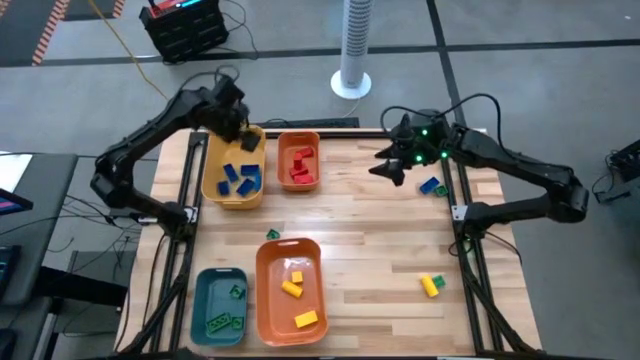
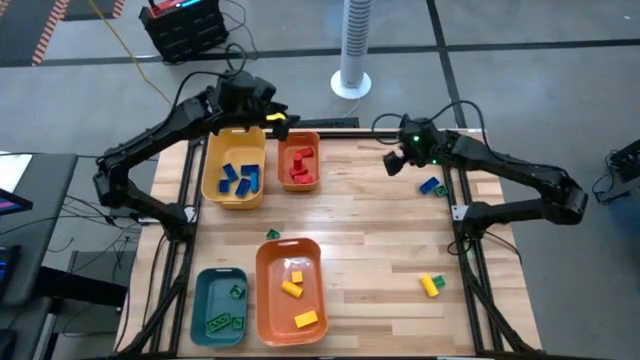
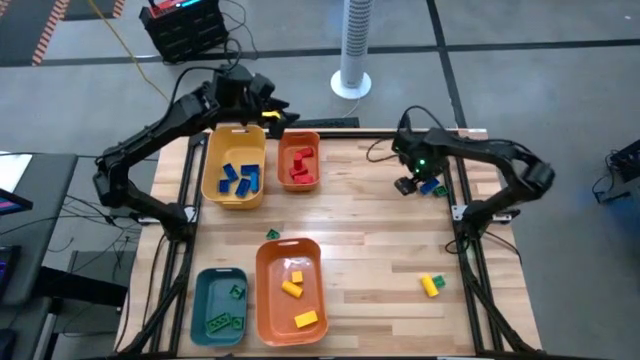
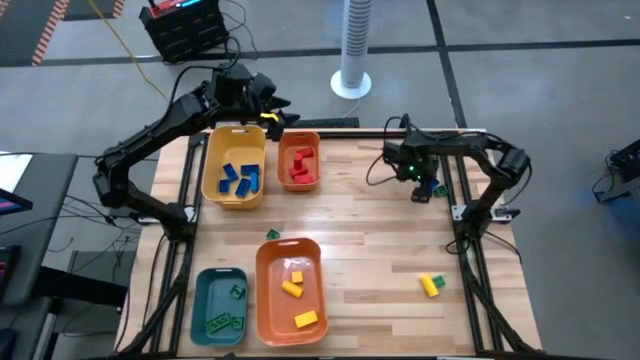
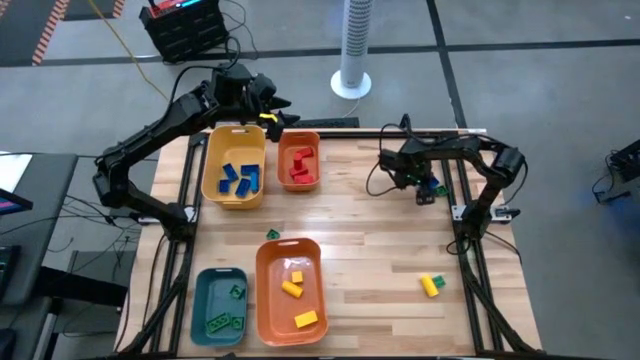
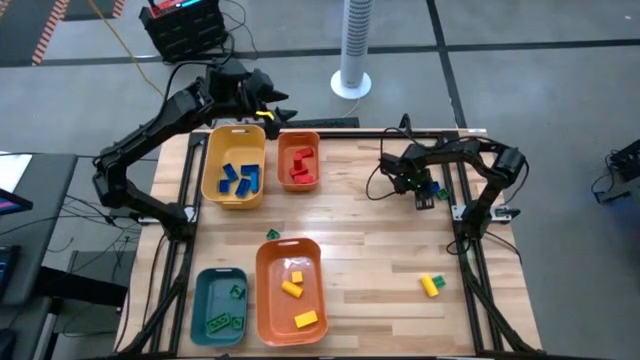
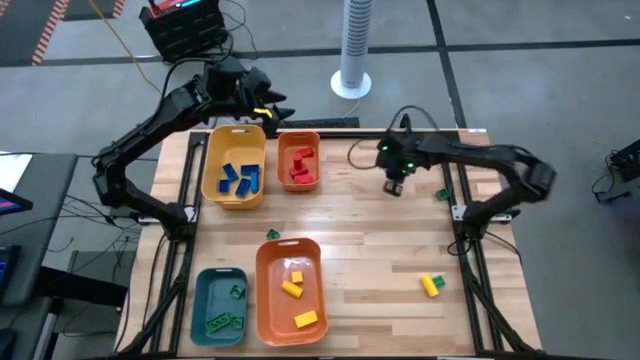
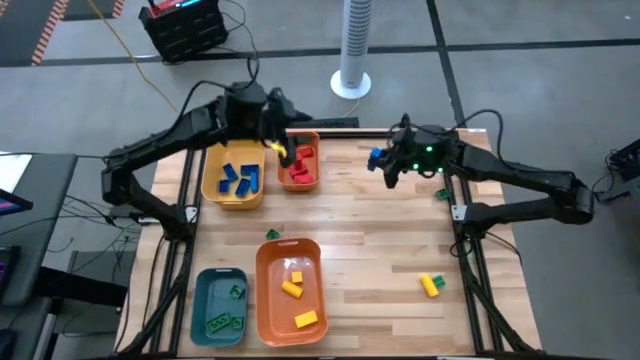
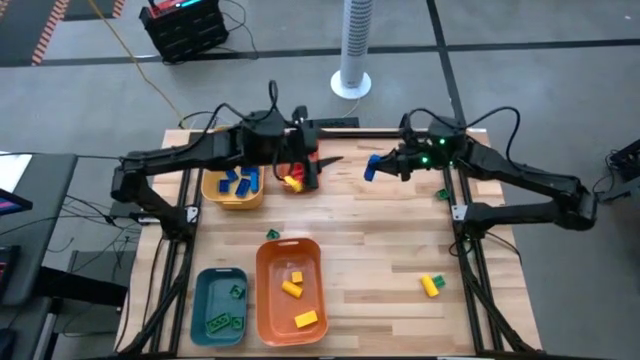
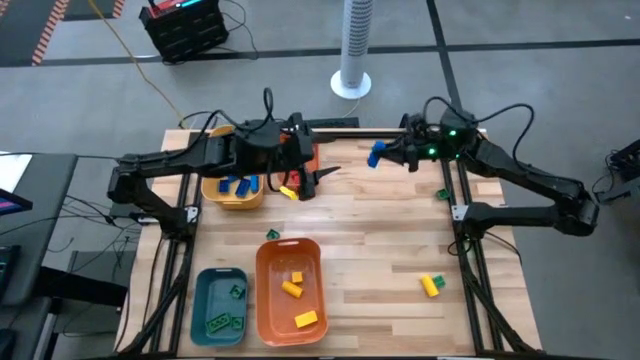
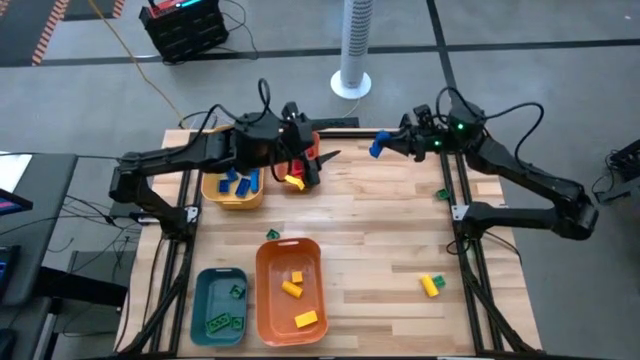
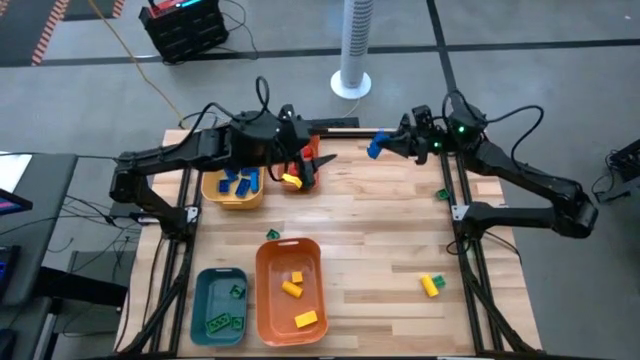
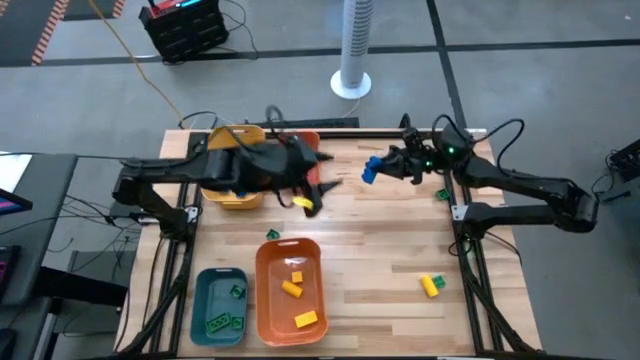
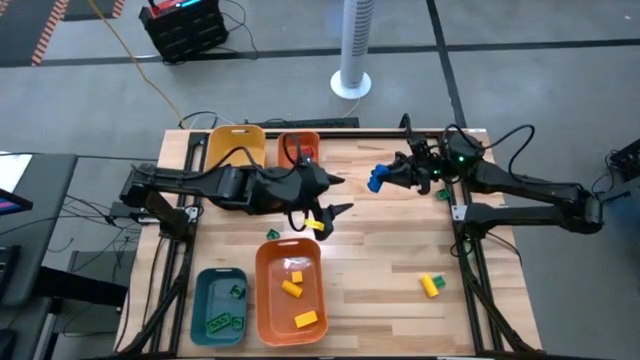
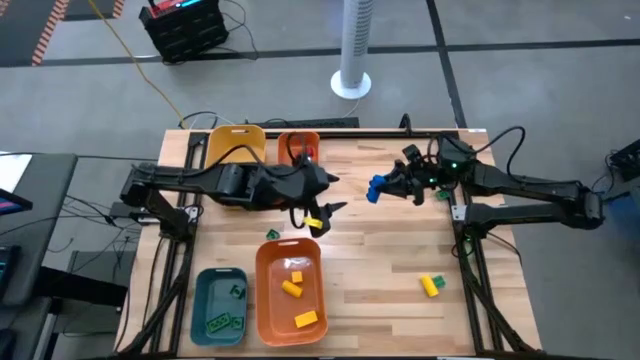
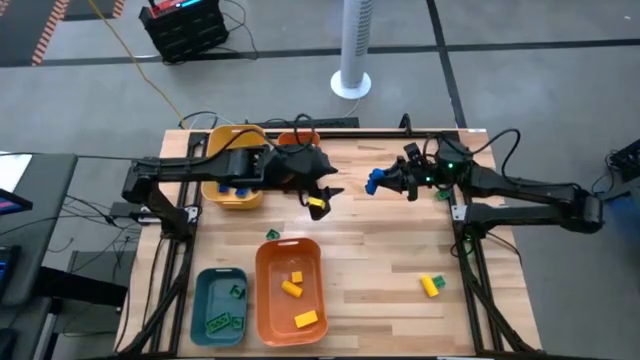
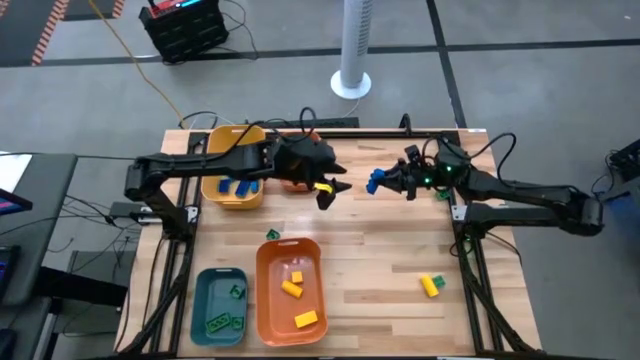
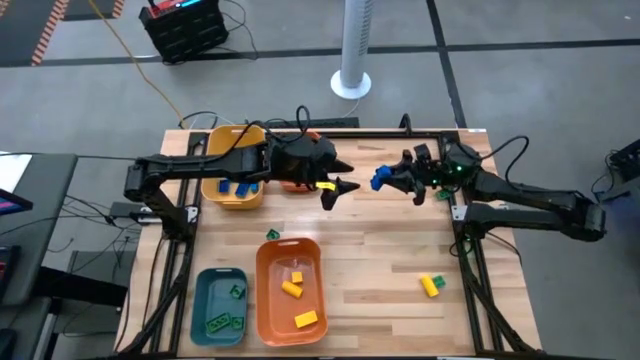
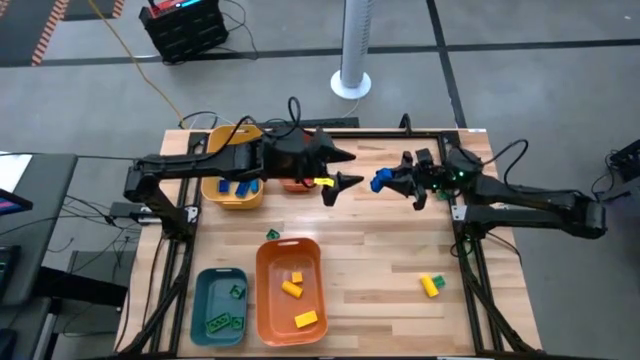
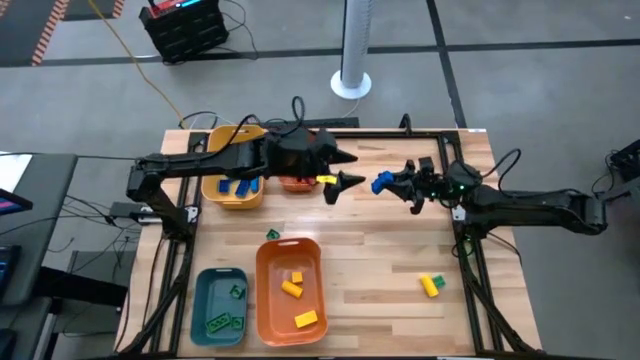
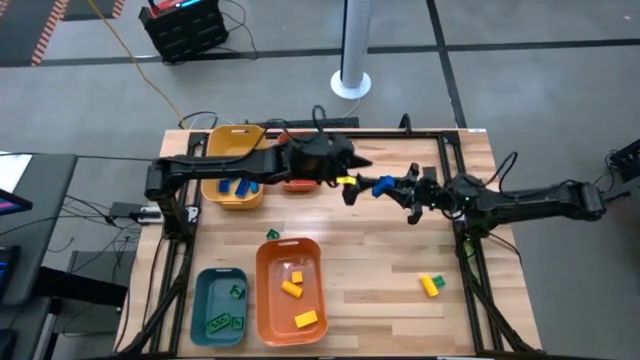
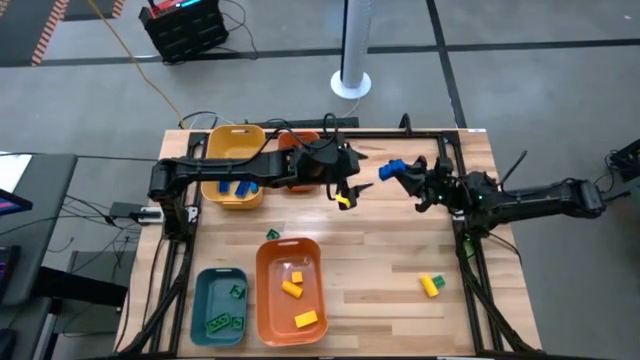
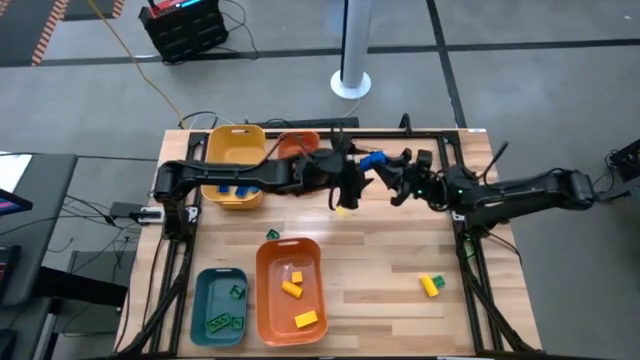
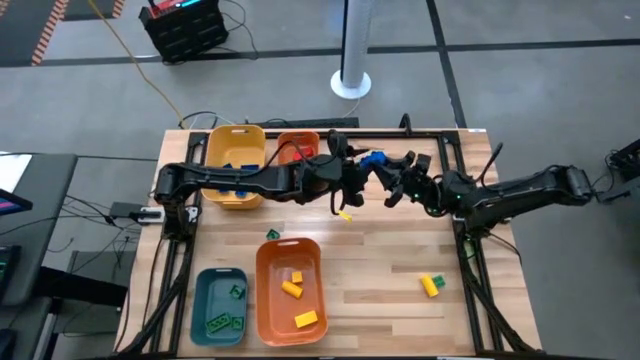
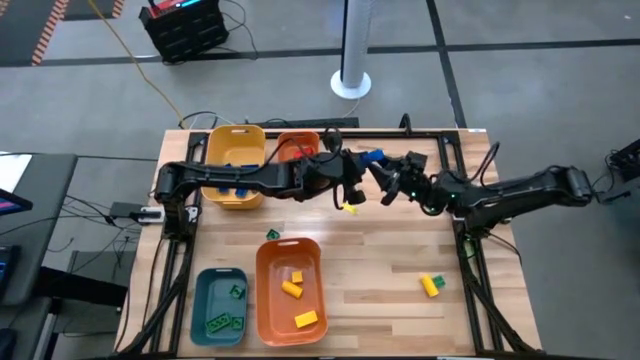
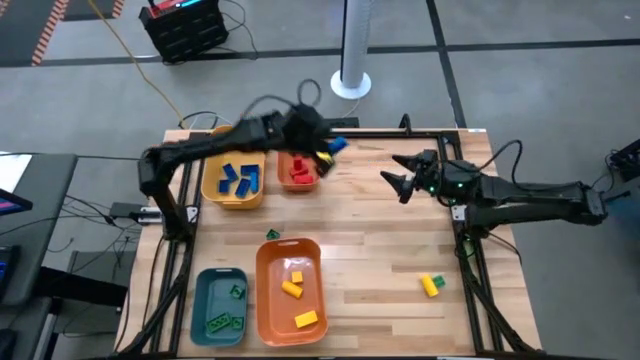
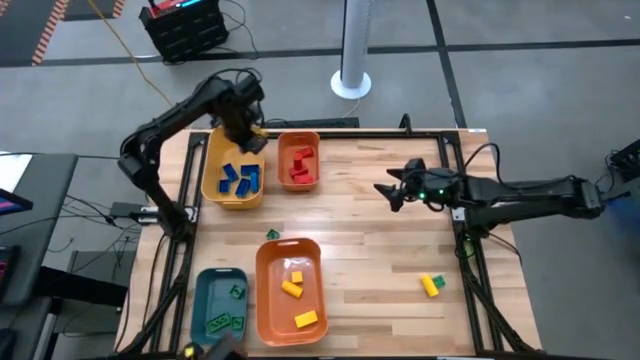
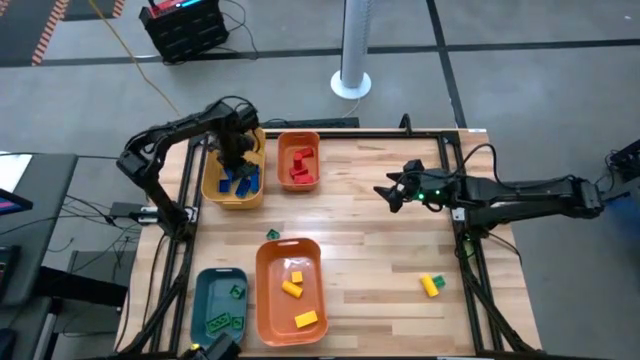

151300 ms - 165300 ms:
Task: Sort blocks
Put the blue game piece into the yellow bin

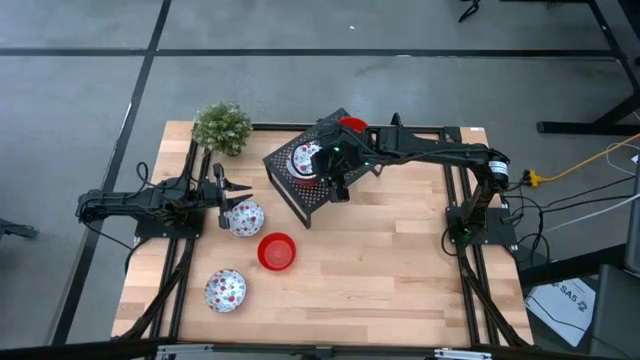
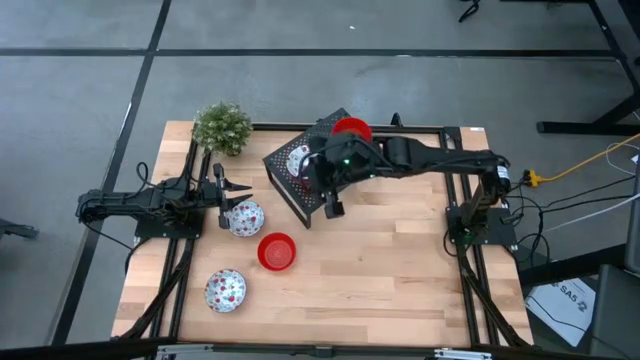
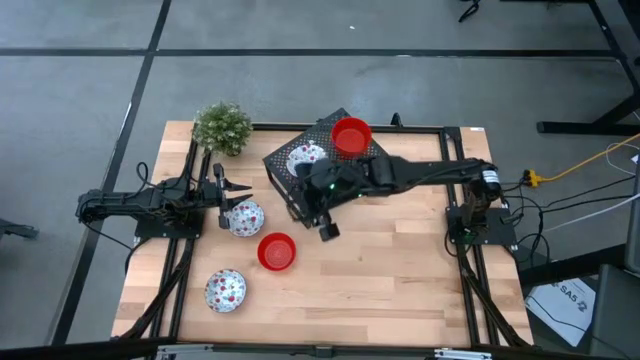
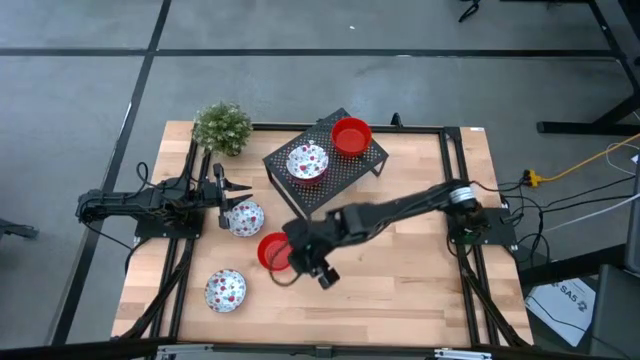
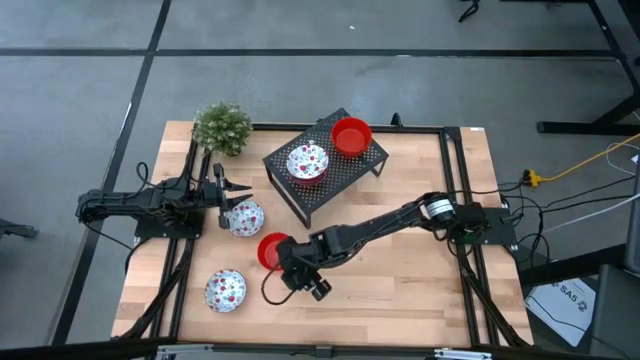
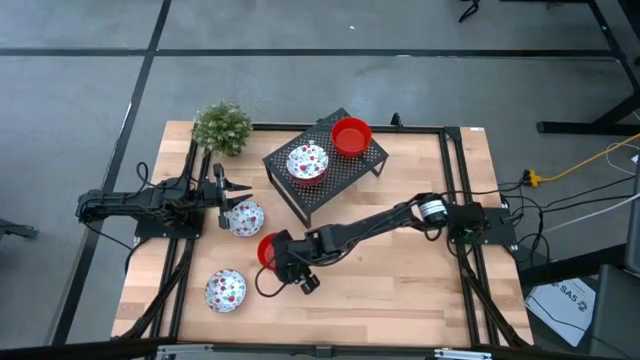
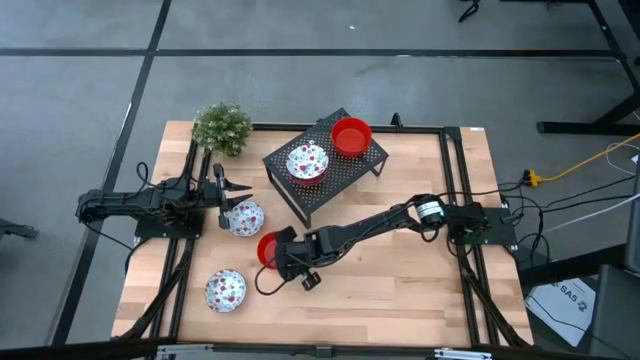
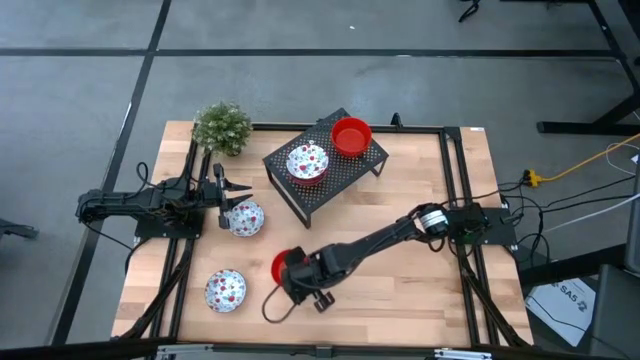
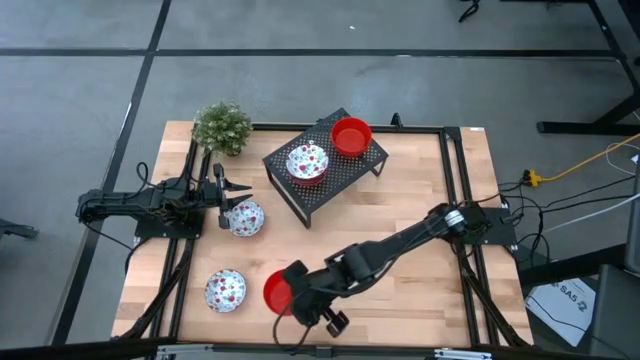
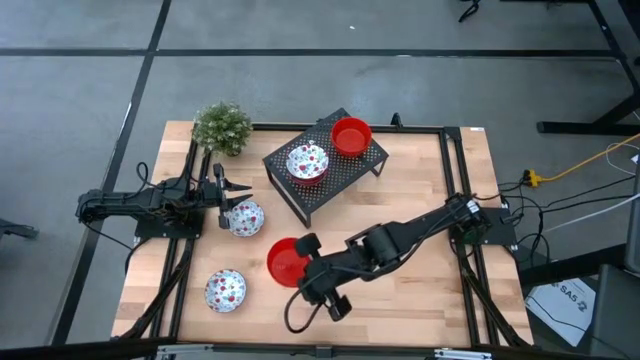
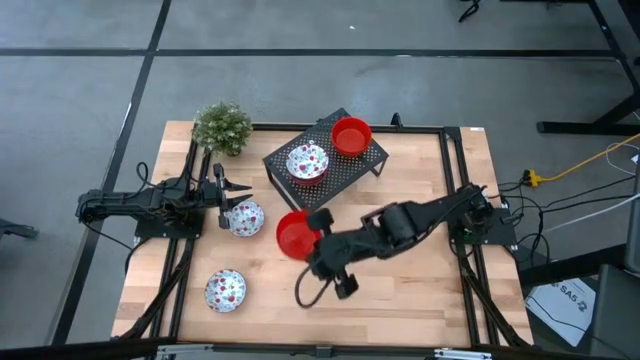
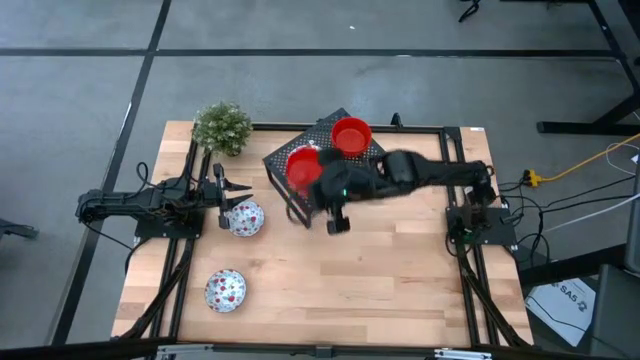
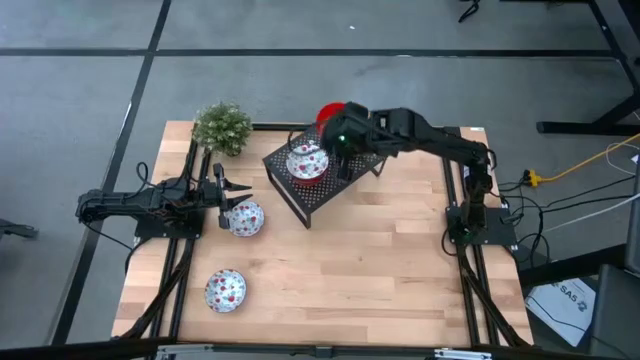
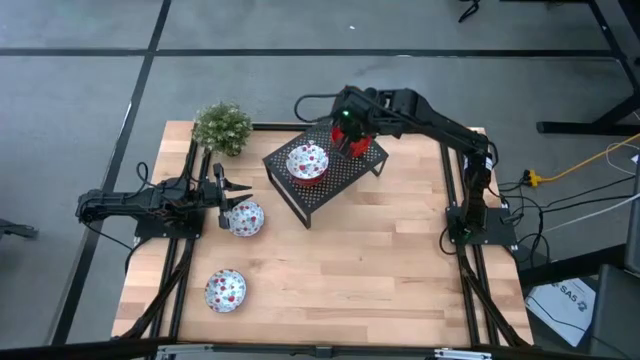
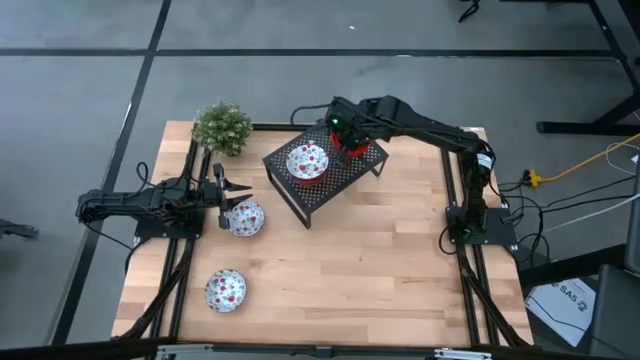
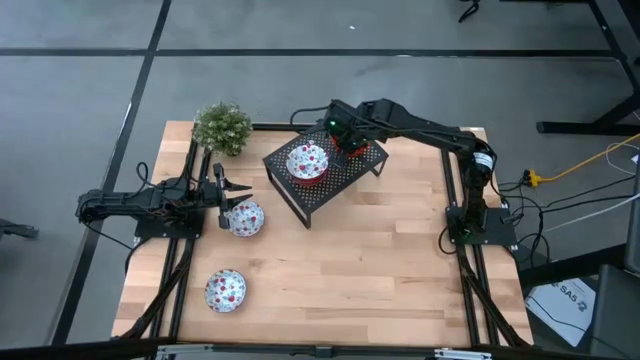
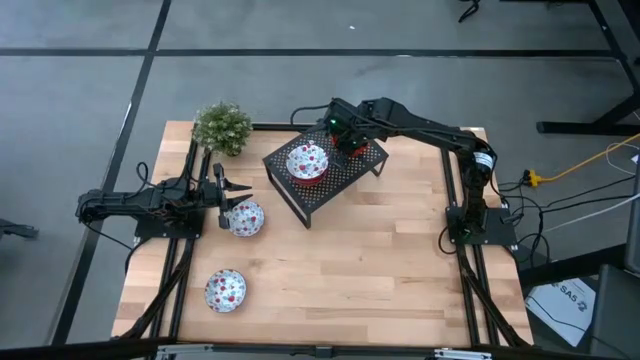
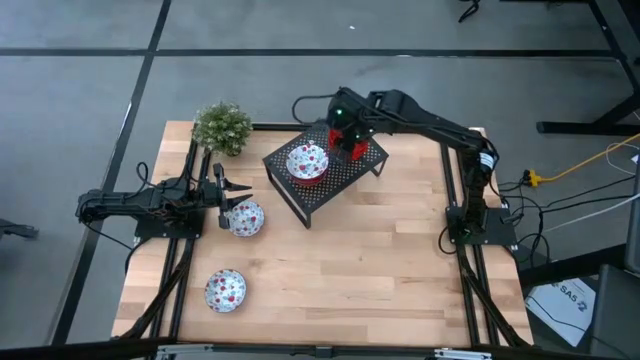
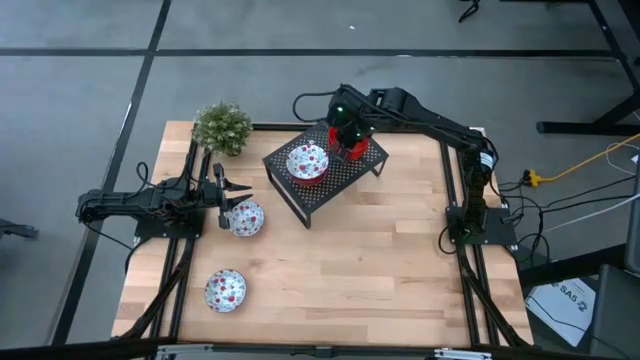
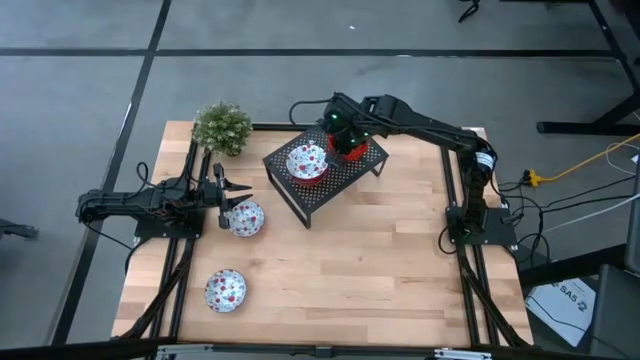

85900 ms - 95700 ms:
Task: Pick & Place Mini bowls
Stack the red bowl on the red bowl on the shelf
